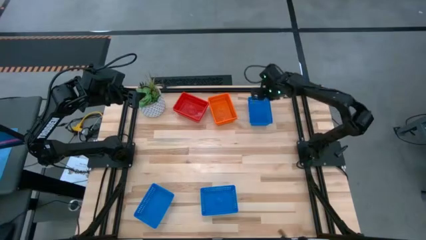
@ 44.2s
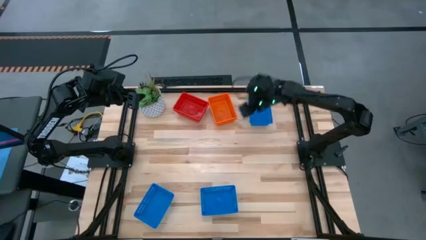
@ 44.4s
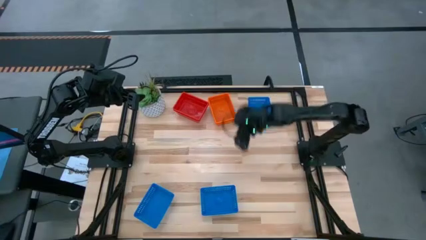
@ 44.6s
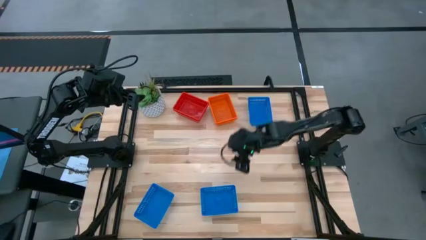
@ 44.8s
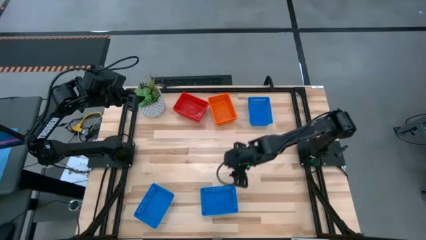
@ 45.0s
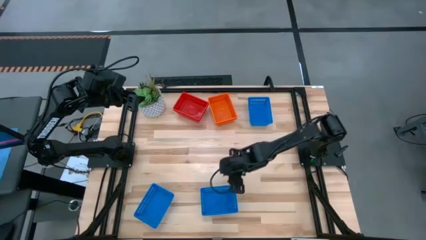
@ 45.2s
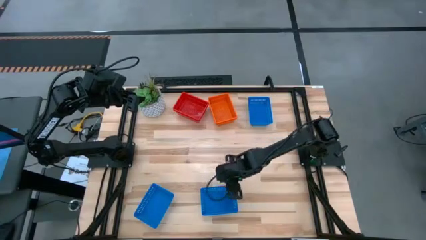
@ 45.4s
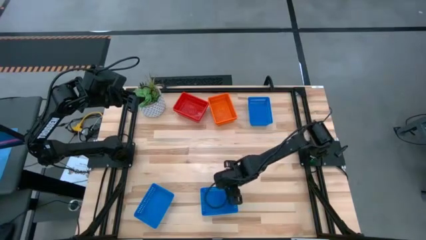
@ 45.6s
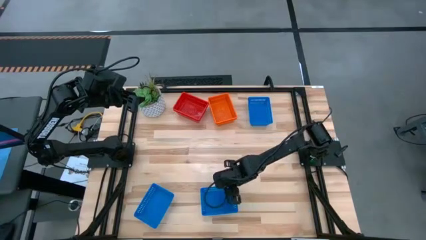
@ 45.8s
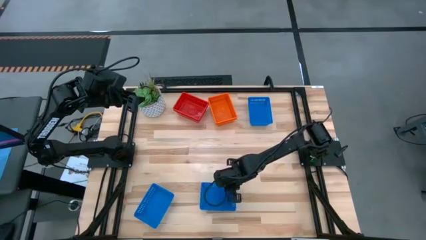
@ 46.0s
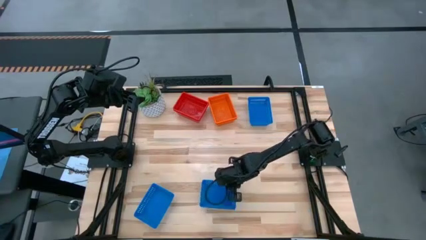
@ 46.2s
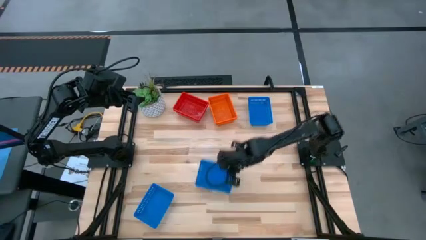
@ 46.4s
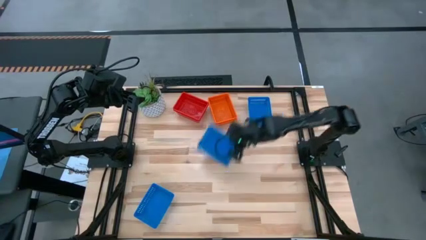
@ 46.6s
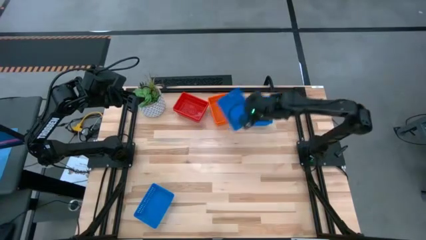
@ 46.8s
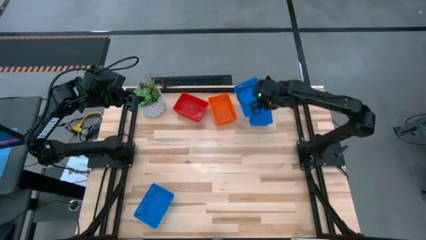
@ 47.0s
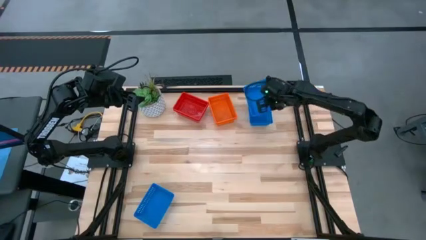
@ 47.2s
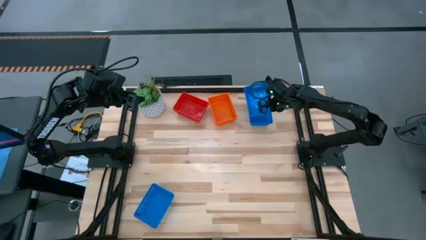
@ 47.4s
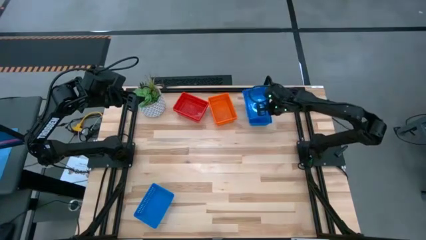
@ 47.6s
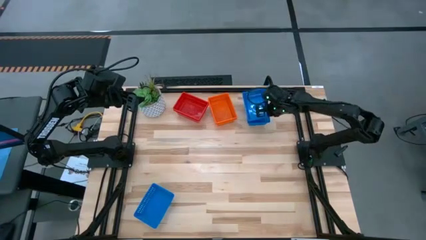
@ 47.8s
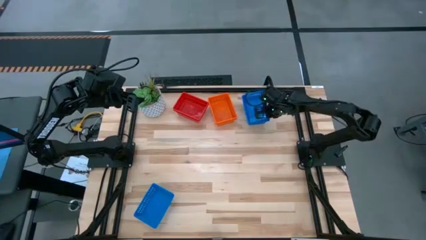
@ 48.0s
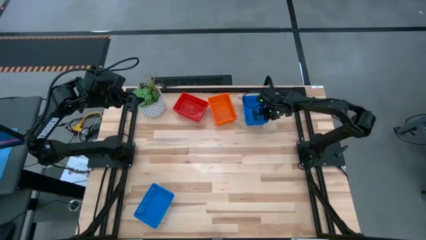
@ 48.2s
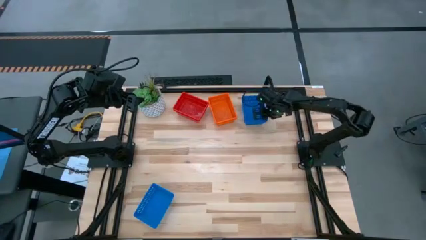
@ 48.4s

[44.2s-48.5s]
Stack the right blue bin on top of the top blue bin

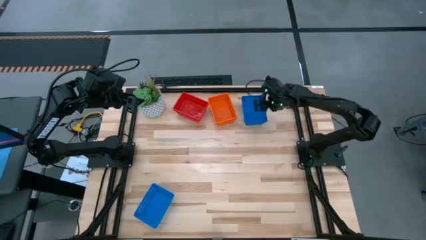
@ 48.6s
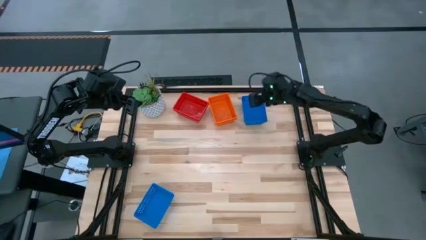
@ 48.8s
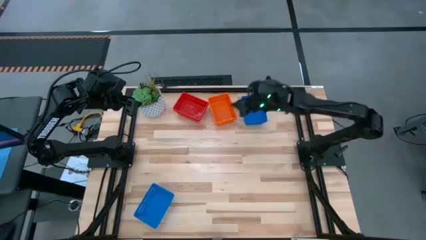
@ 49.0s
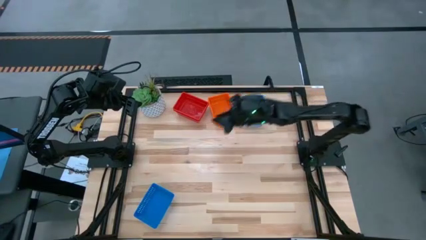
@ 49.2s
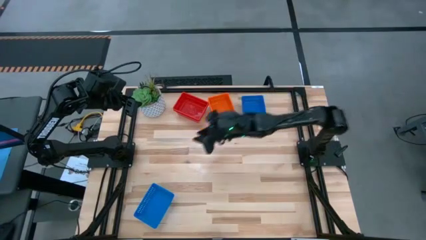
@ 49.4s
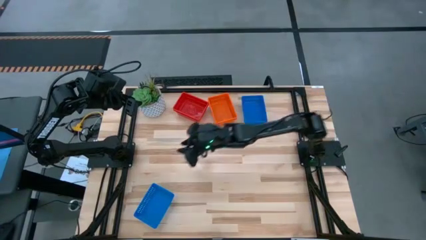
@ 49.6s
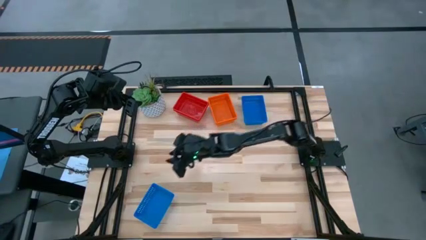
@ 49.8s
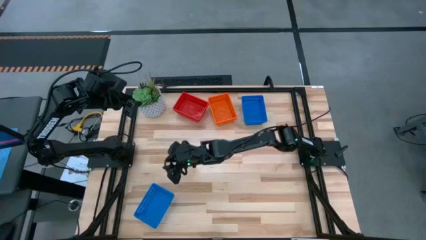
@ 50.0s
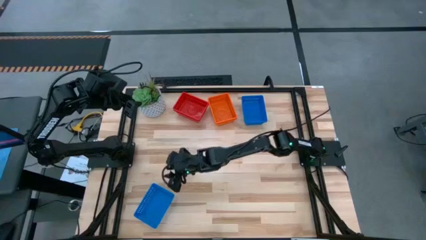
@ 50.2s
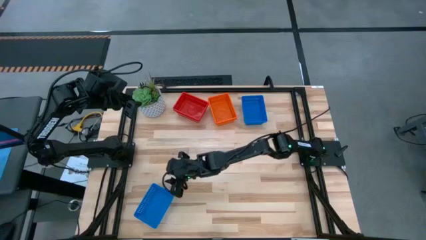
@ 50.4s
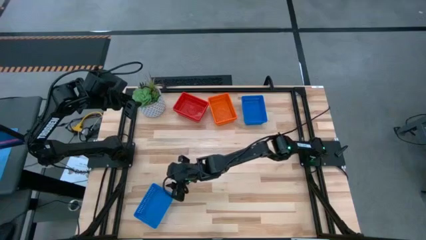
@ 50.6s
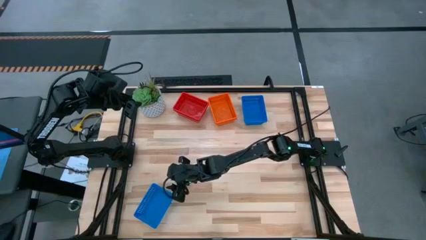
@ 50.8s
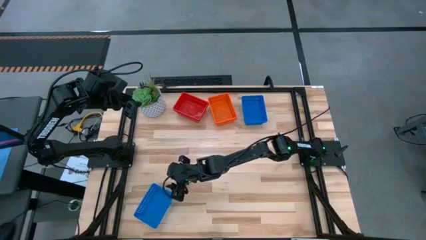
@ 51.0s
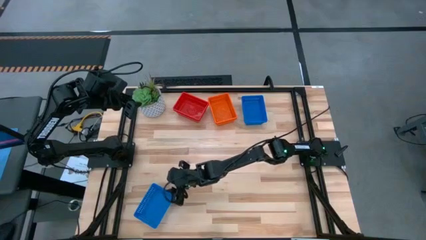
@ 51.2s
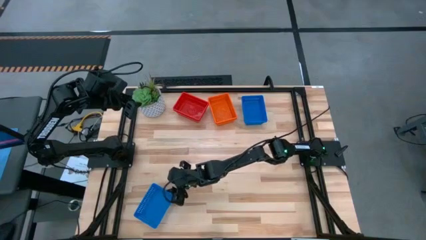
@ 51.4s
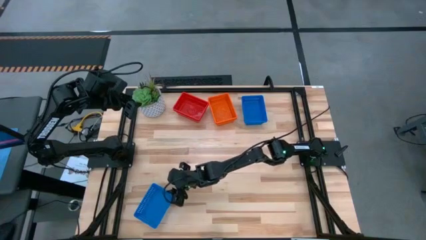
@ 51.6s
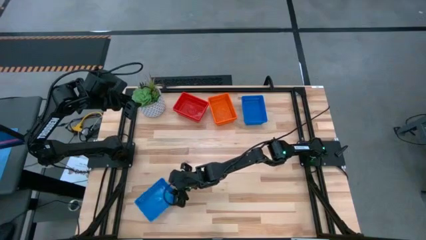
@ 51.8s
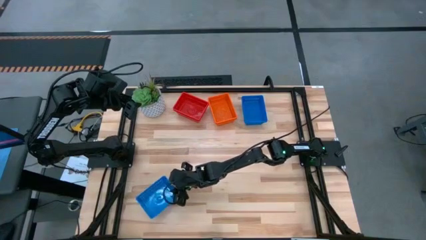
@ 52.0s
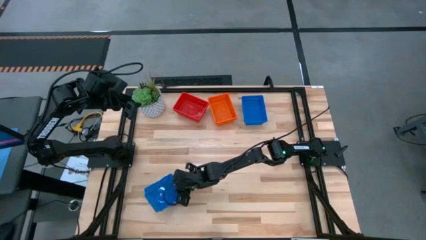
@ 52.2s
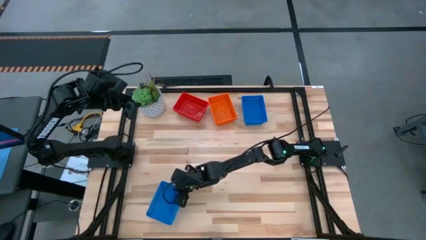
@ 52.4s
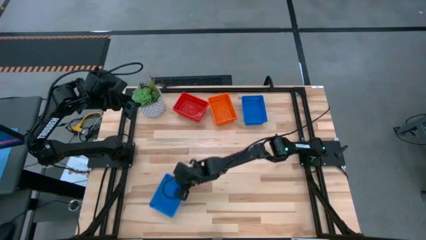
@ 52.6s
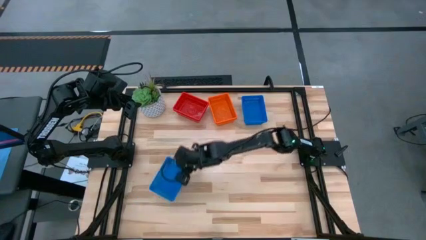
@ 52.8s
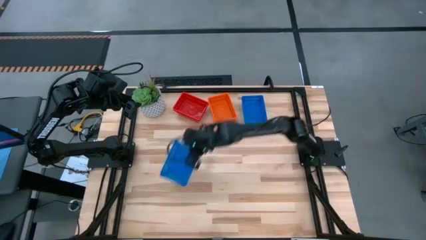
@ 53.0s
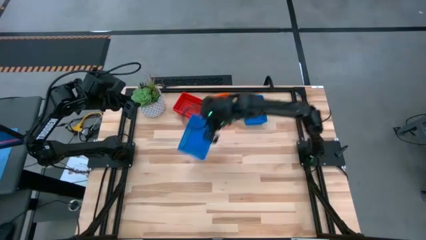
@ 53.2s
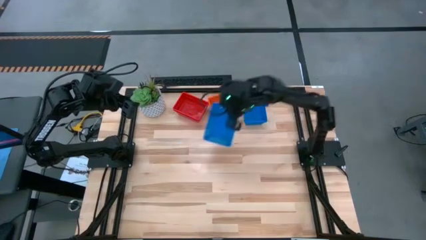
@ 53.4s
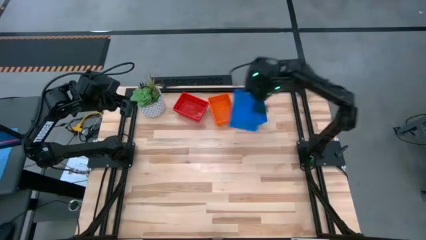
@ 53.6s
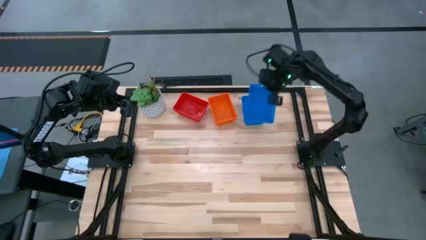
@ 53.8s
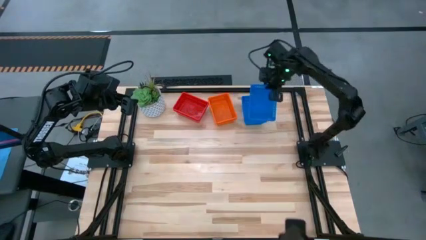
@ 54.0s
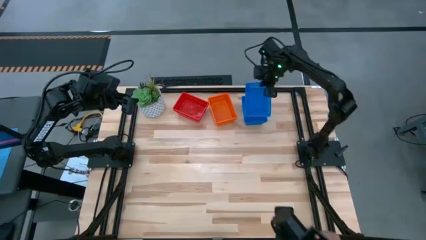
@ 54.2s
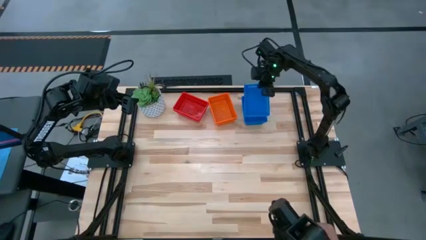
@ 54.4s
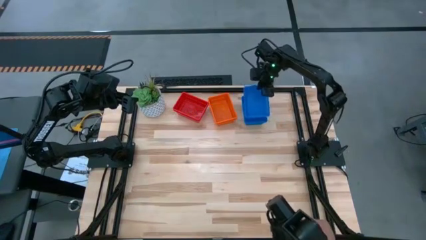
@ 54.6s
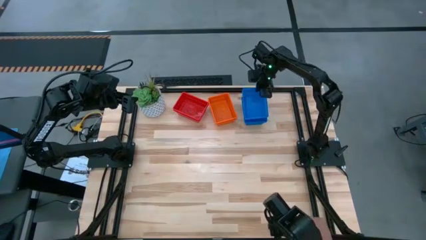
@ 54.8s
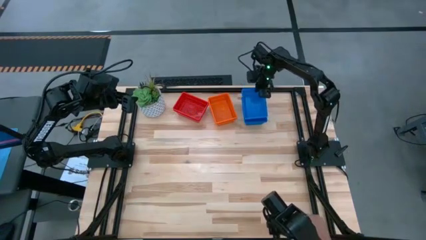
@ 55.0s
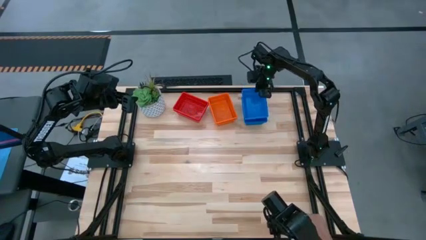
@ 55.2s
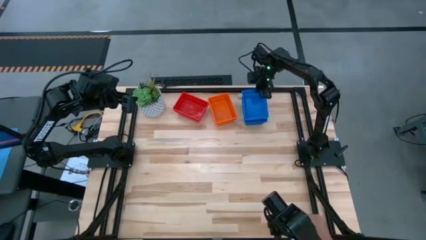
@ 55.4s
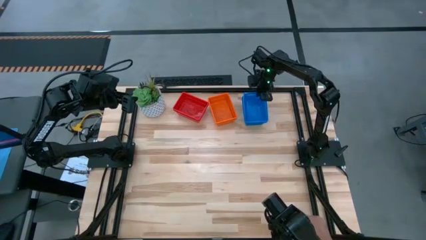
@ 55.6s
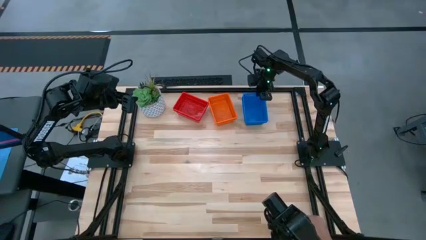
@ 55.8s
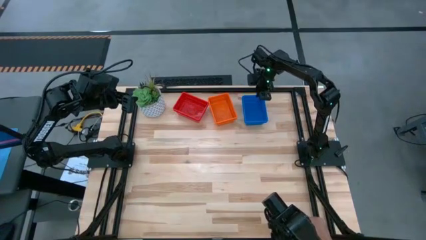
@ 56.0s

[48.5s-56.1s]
Stack the bottom blue bin on top of the top blue bin

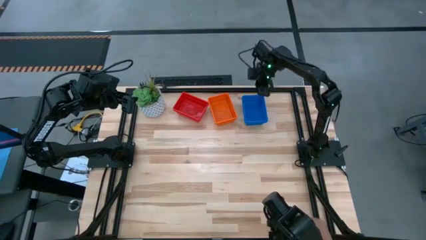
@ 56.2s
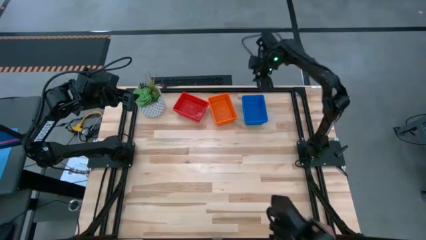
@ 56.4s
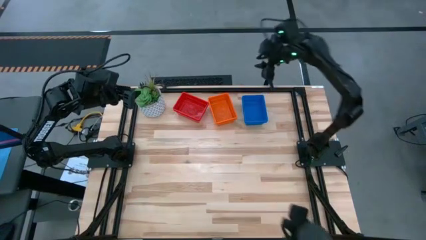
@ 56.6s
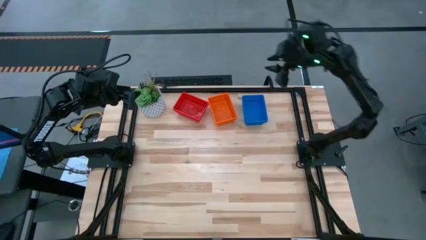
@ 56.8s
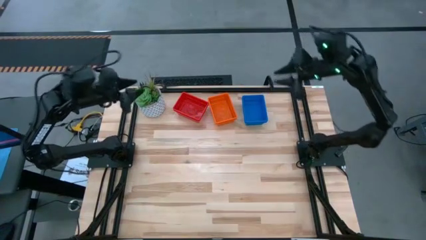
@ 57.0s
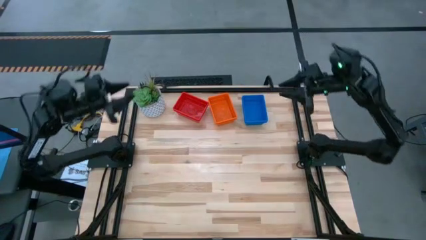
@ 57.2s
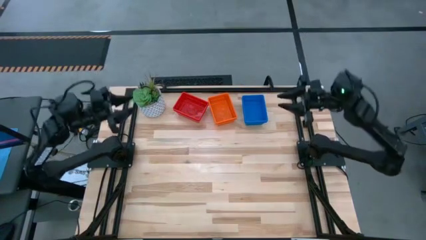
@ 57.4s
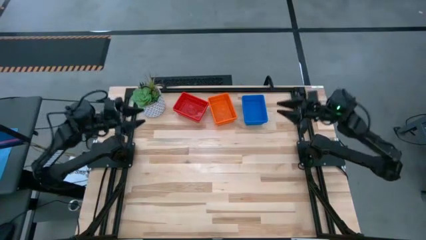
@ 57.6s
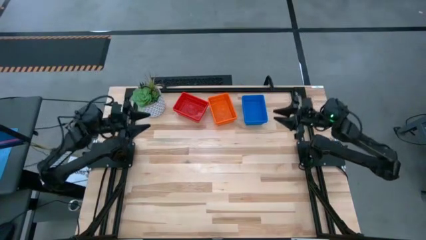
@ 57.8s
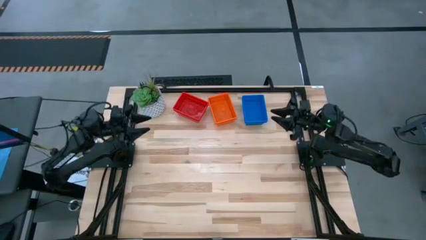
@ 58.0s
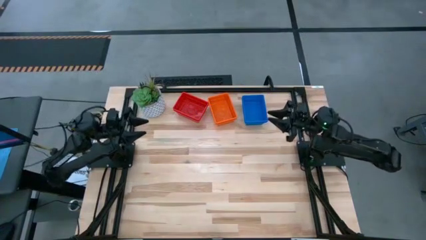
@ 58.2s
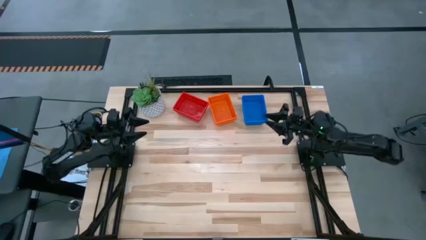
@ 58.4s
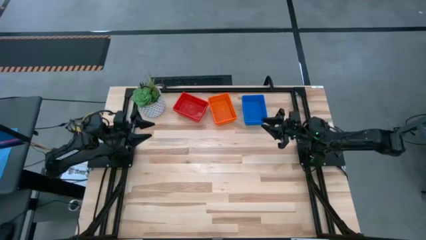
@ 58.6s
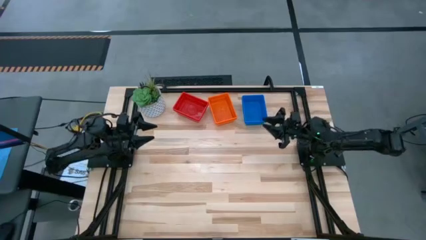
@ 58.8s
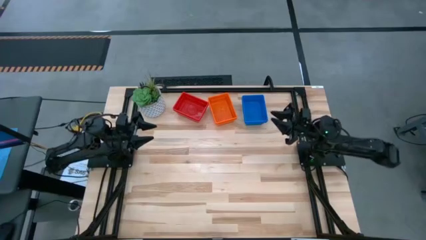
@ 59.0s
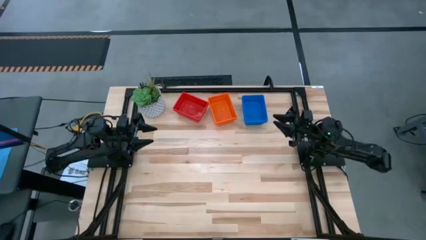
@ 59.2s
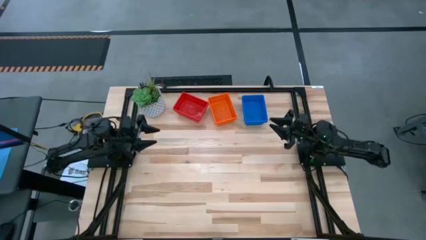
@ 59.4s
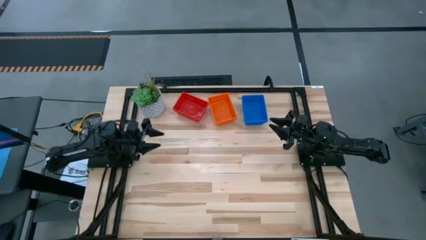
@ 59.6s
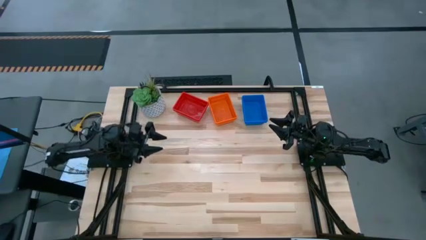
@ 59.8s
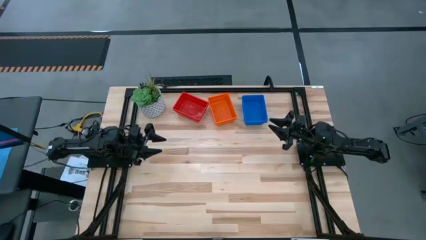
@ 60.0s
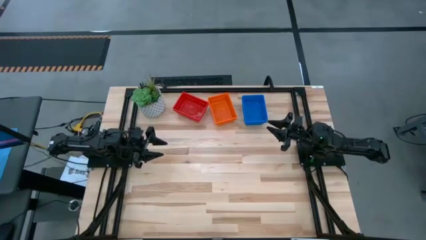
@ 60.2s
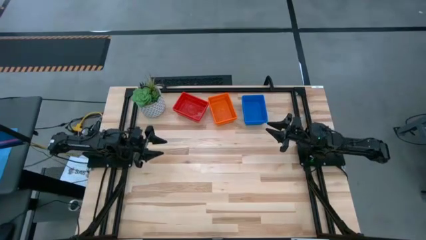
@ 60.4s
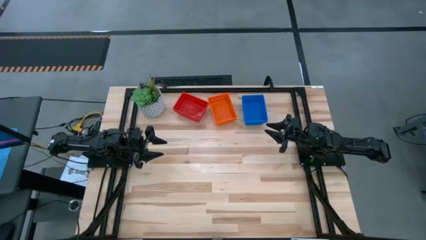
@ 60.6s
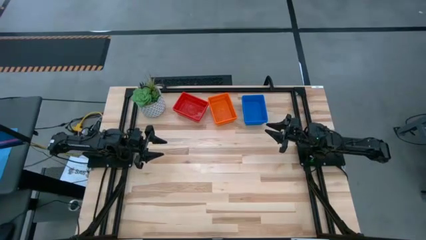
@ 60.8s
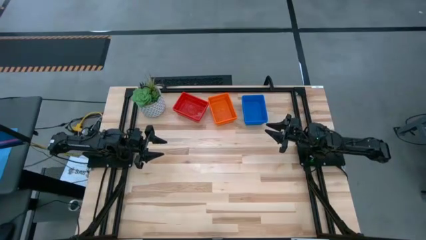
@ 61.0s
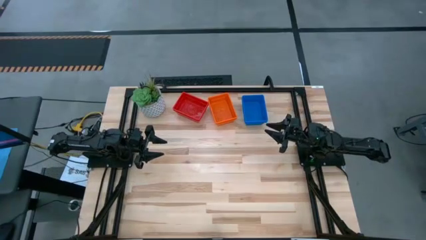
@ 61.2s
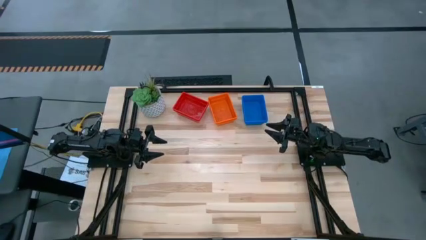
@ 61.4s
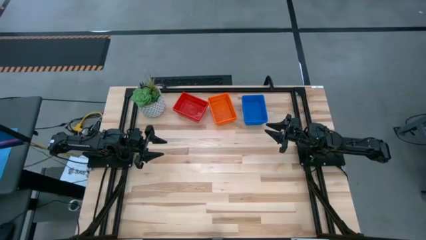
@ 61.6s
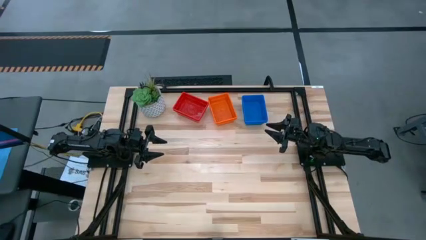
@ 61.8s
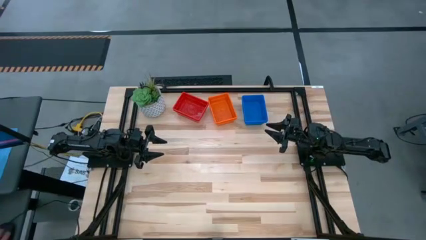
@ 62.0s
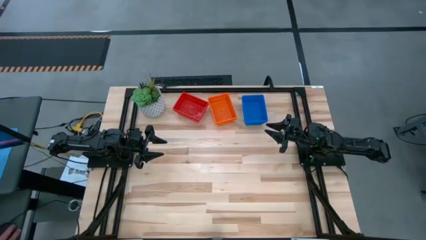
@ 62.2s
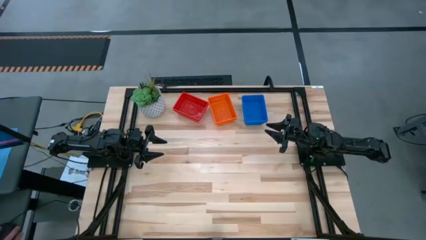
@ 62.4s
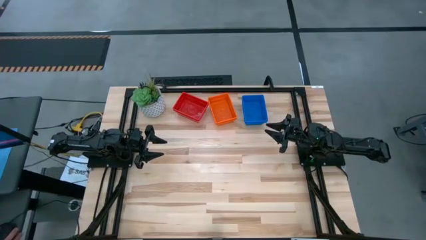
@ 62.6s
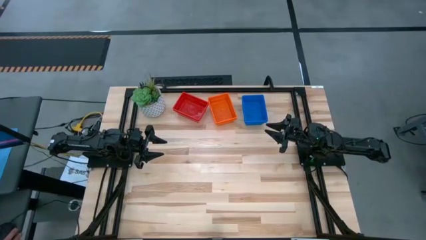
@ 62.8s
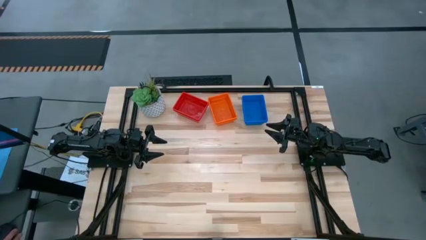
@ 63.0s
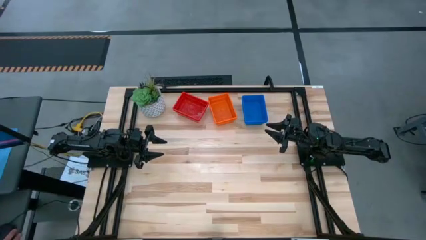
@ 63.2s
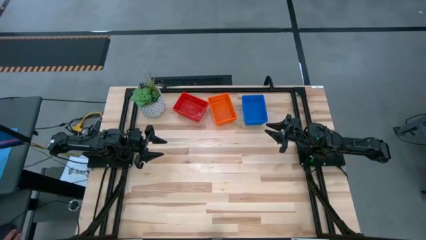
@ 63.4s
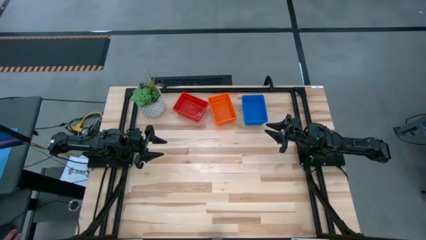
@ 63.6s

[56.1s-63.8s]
Return to Home Position
